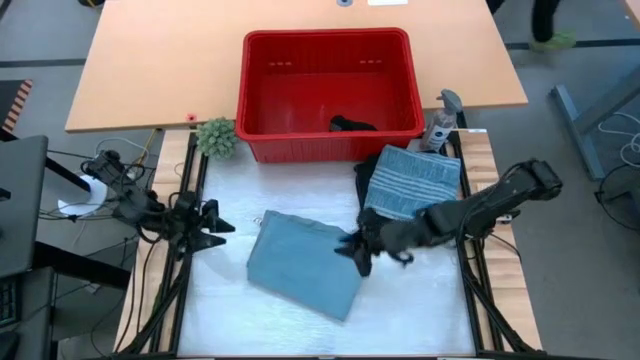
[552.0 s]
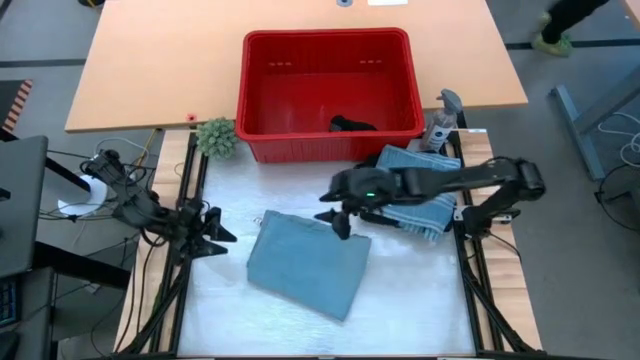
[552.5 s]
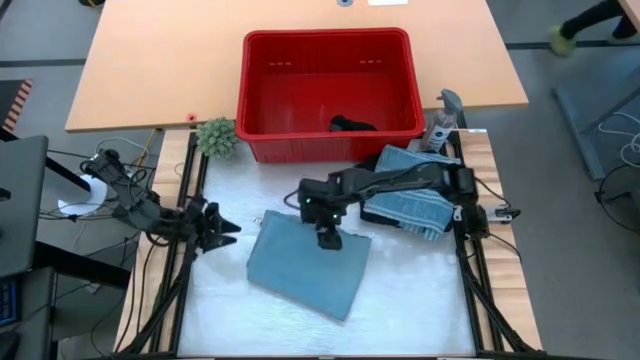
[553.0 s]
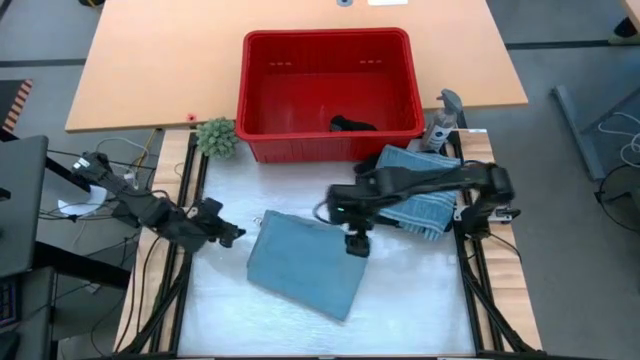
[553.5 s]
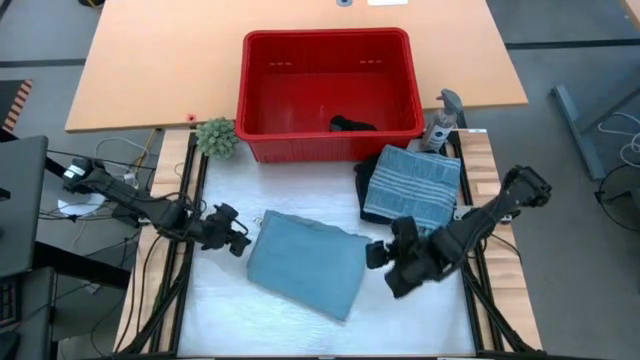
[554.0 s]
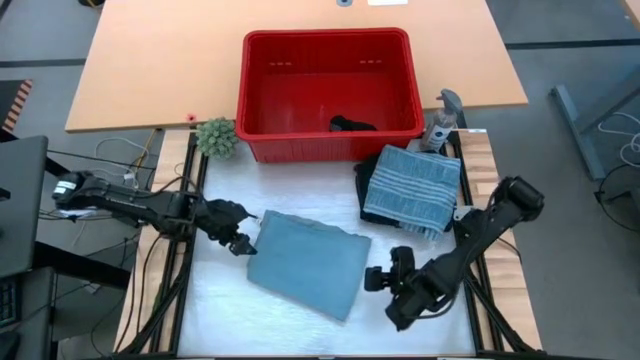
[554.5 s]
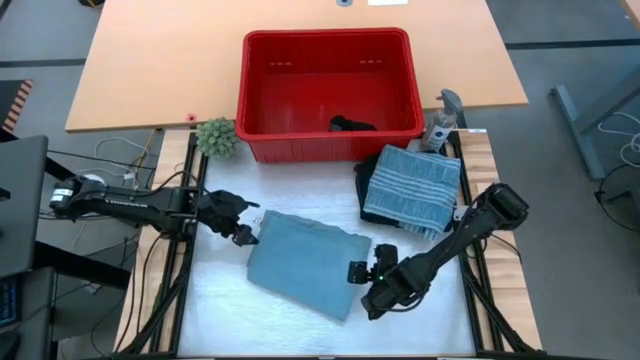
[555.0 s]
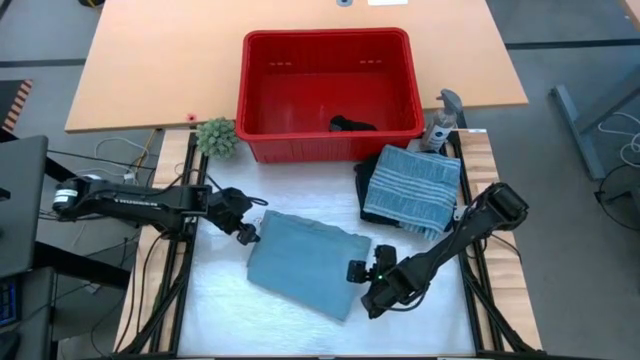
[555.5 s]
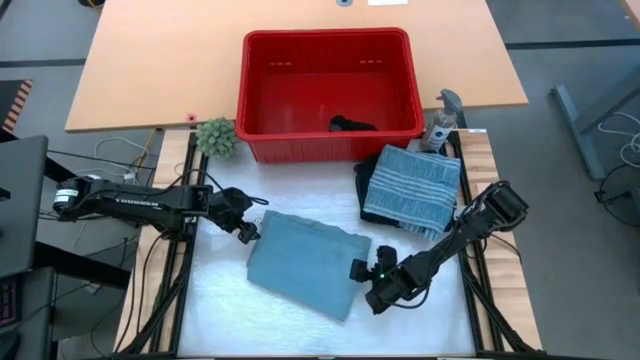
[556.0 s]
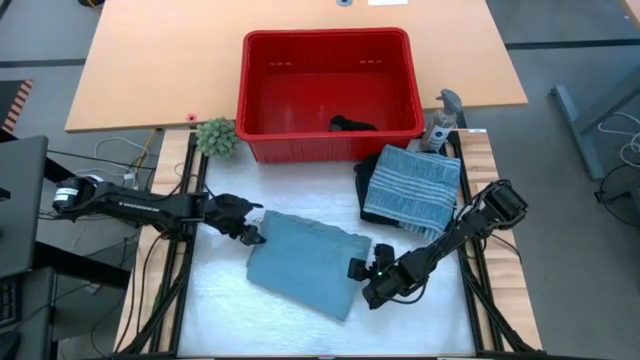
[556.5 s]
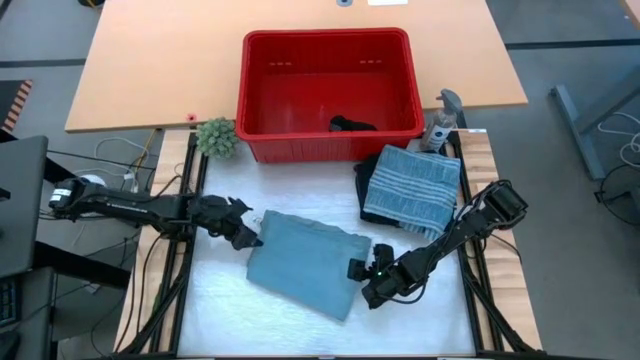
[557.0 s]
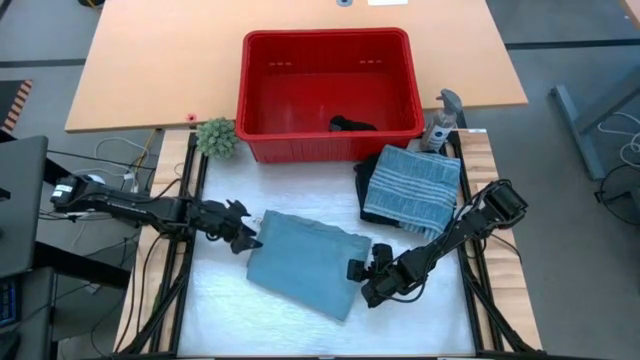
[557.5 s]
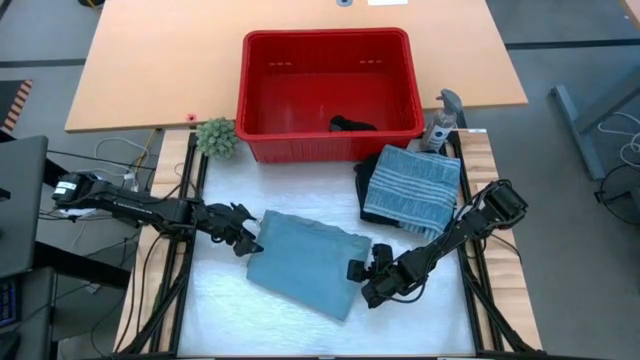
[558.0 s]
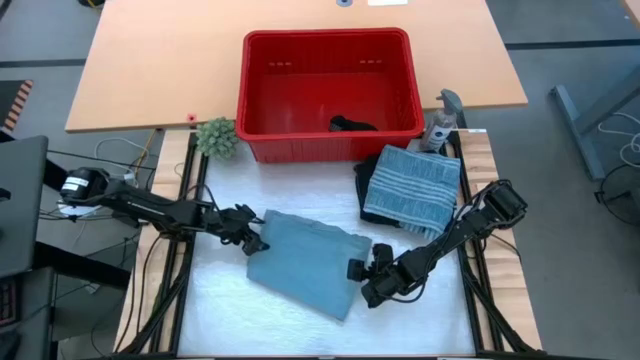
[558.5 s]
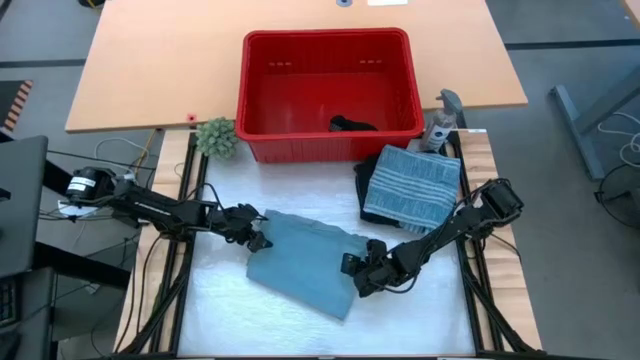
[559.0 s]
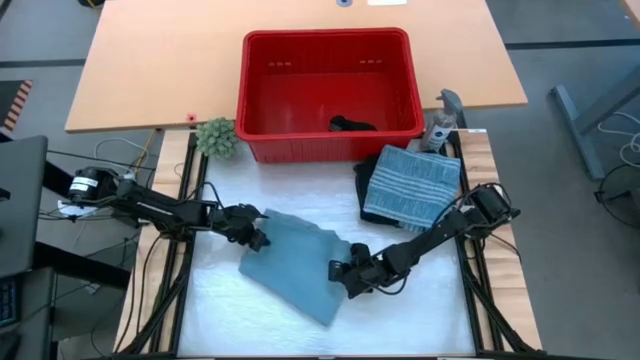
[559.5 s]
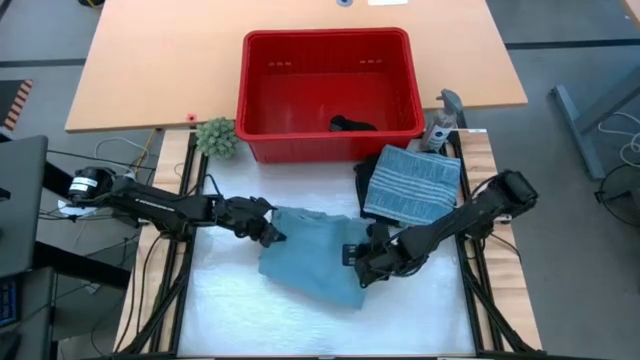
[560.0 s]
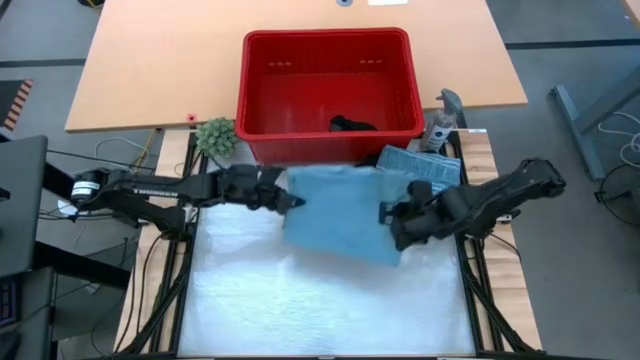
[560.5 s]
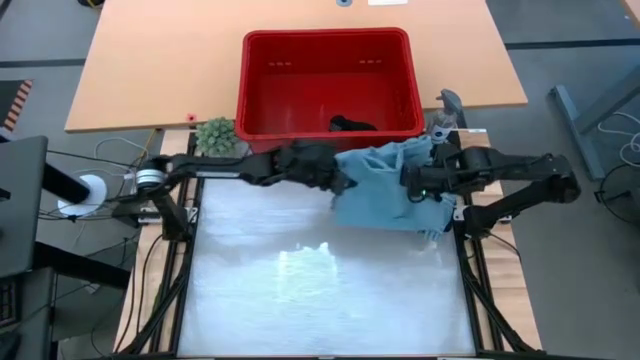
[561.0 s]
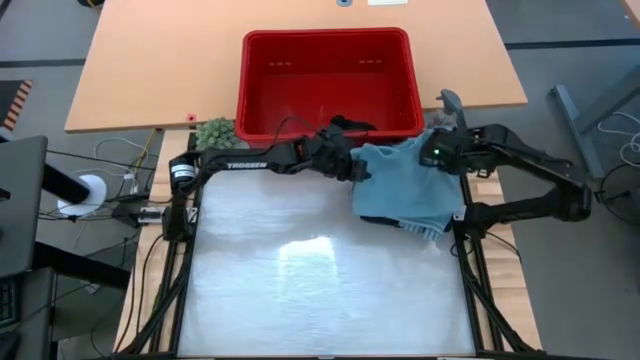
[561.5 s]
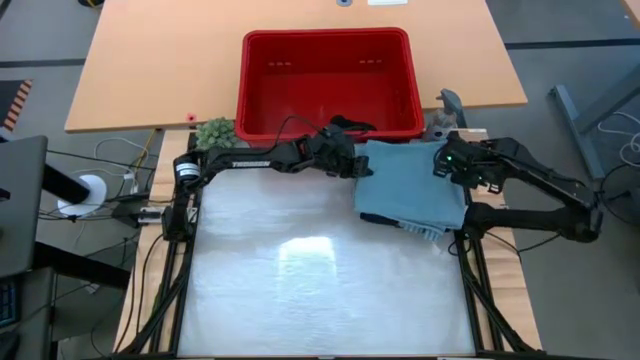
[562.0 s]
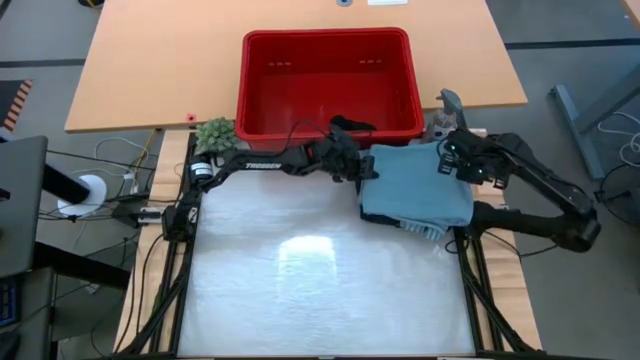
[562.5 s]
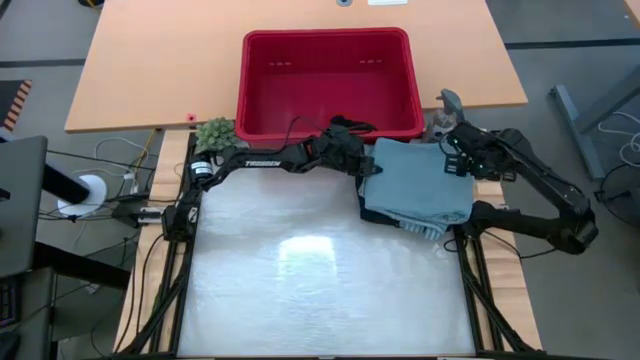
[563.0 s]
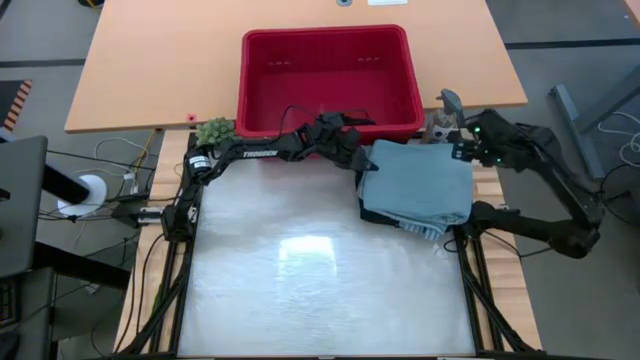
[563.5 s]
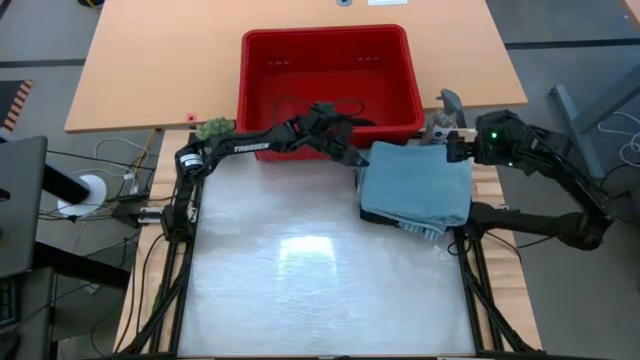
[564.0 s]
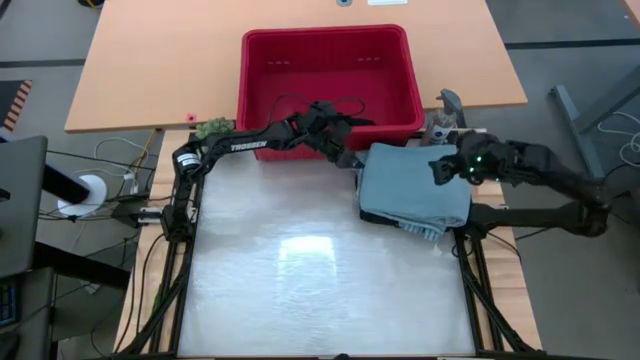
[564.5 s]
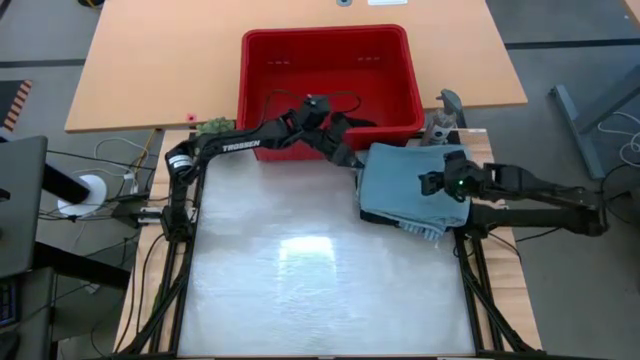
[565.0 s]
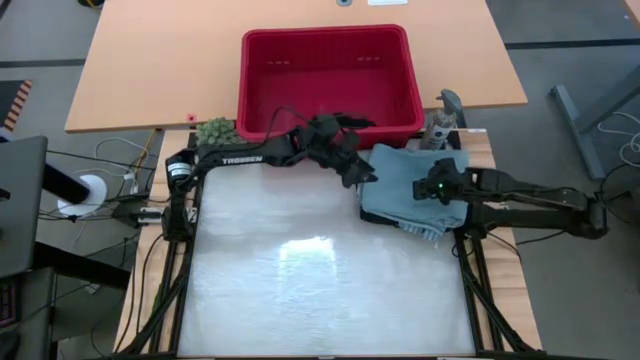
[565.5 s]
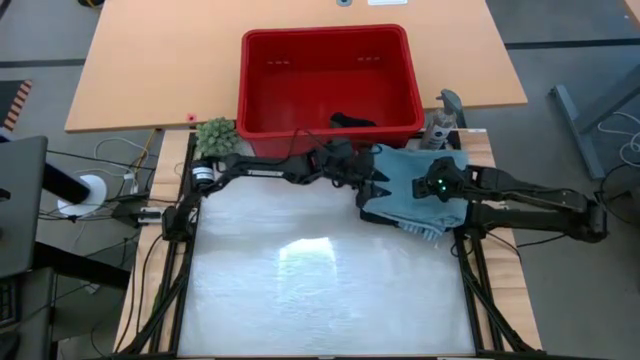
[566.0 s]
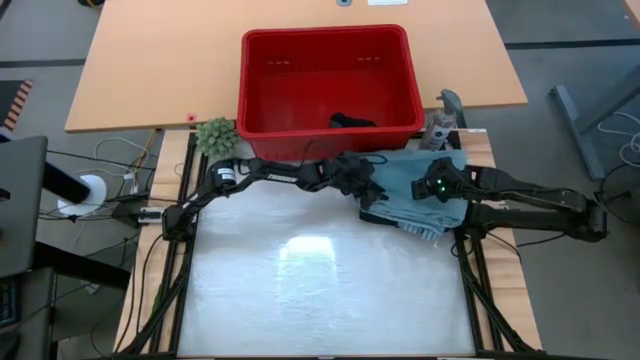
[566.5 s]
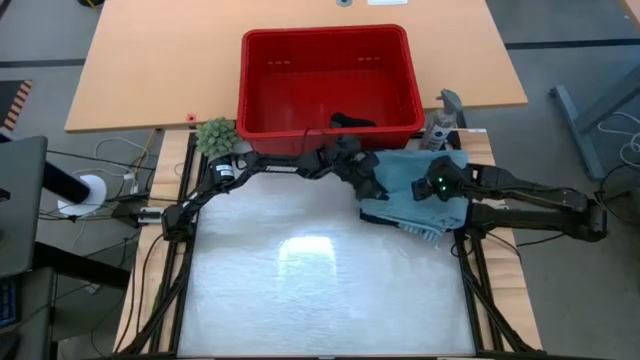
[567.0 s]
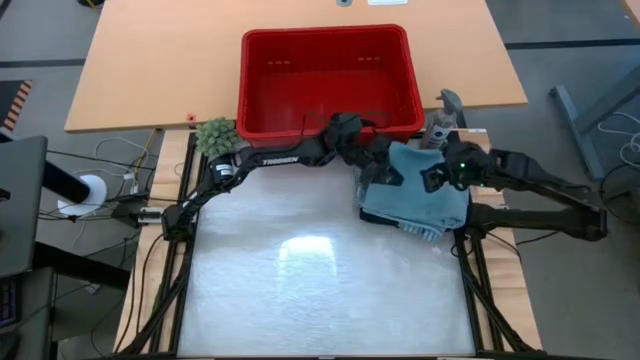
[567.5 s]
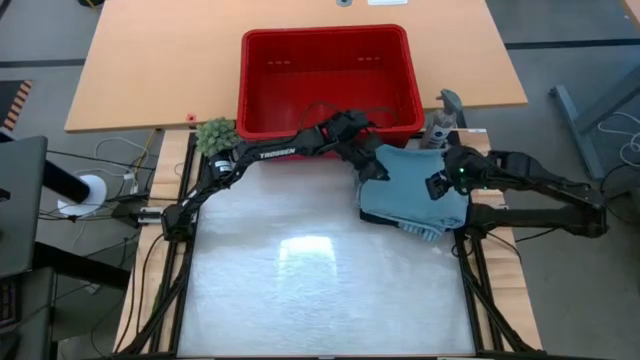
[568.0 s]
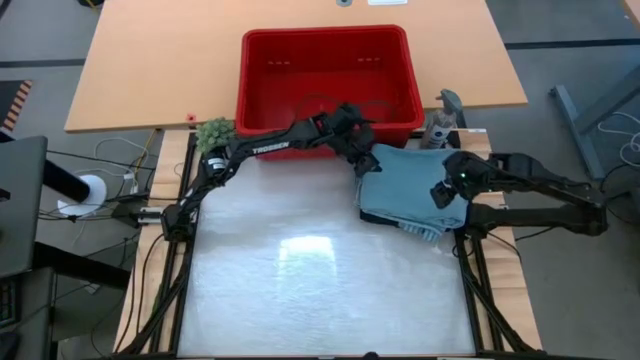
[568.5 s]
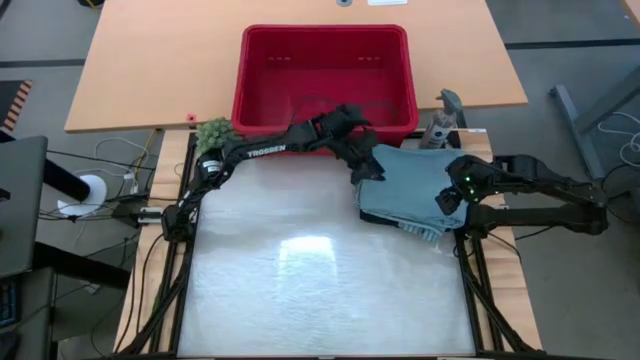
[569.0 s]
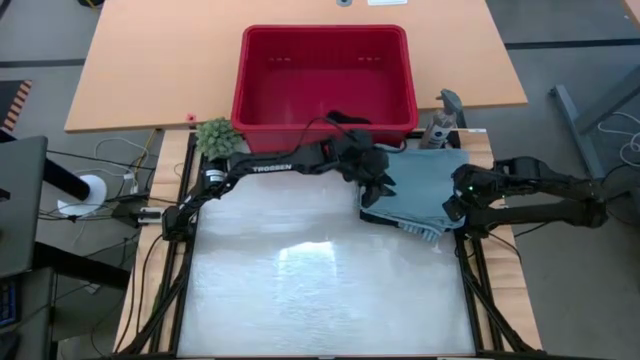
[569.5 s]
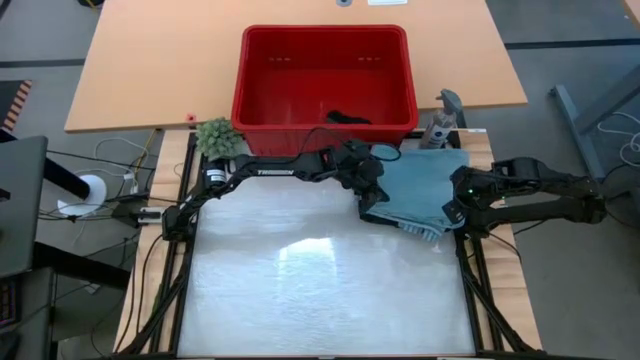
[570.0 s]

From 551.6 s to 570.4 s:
Task: Fold Laundry from Bin
Stack the folded blue pants on top of the folded blue polo shirt

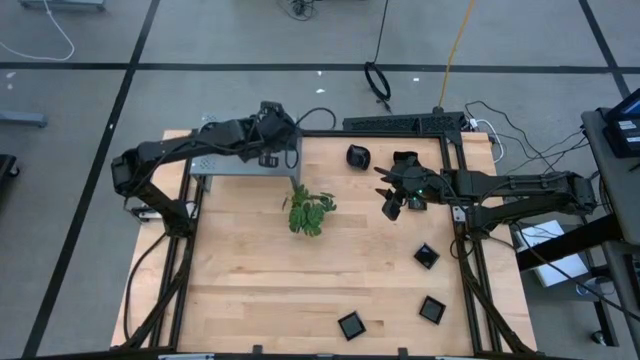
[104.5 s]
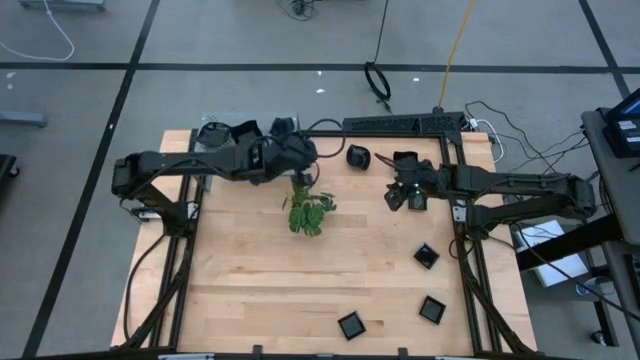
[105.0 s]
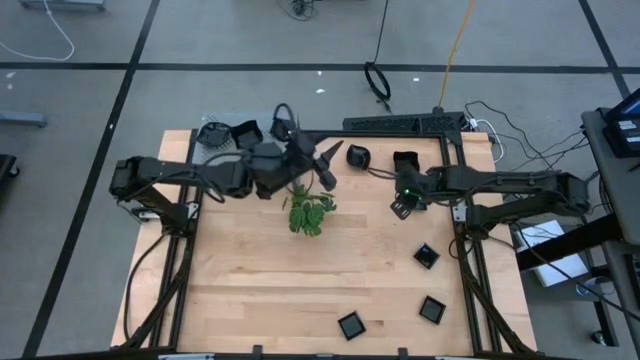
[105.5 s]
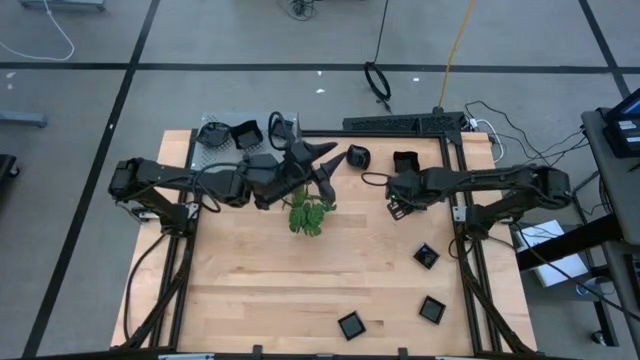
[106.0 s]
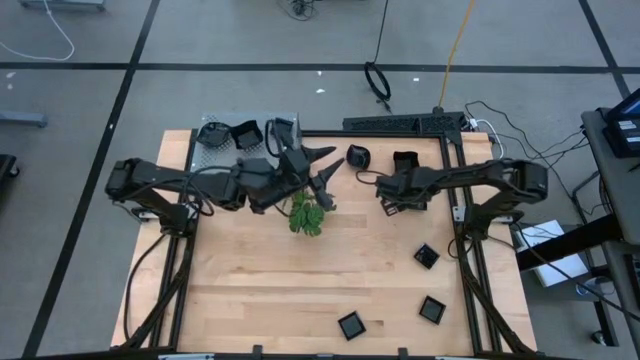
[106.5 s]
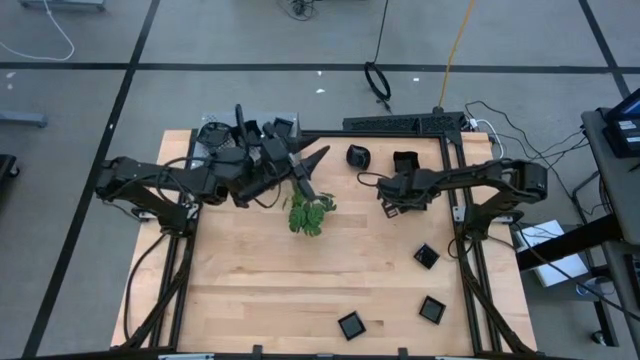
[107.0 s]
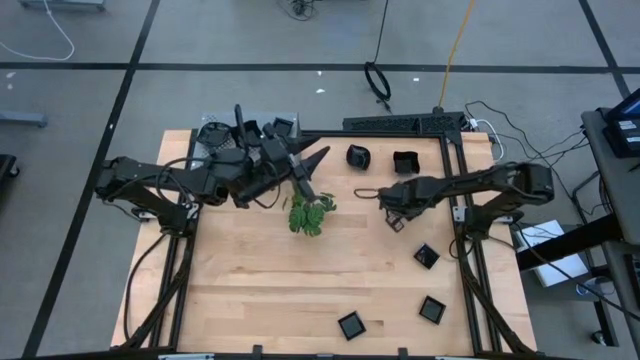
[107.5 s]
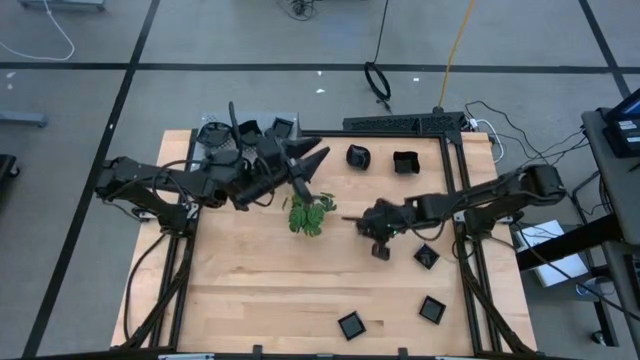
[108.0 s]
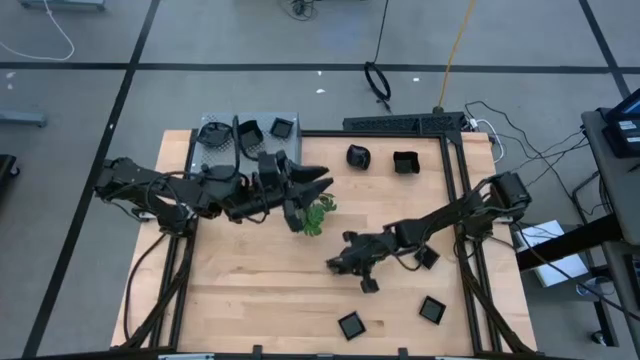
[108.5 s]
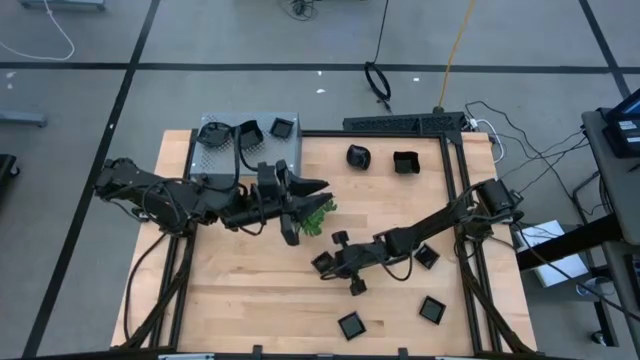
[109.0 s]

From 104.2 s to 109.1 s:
Task: Pick & Place Mini shaped plates
Move the square plate to the center of the table
